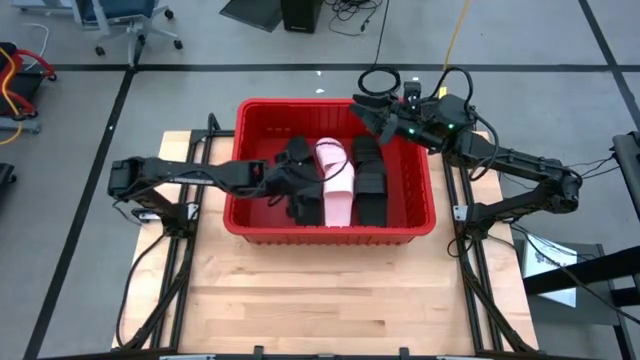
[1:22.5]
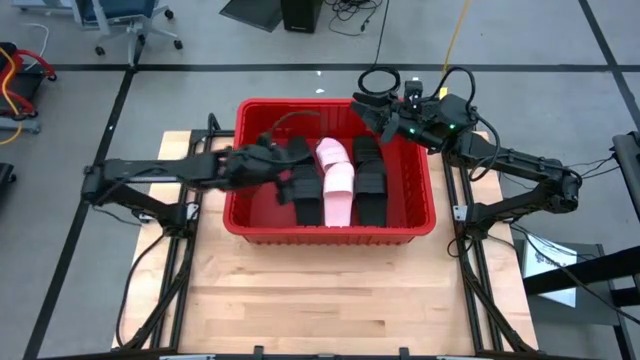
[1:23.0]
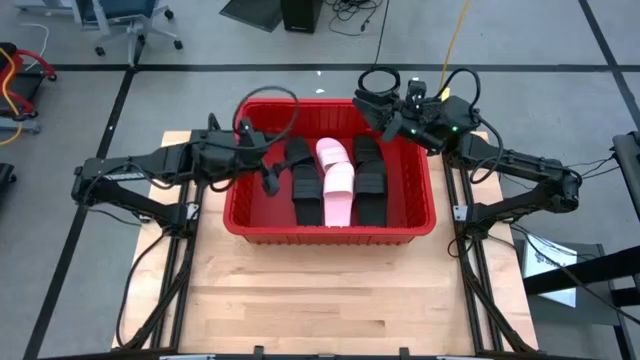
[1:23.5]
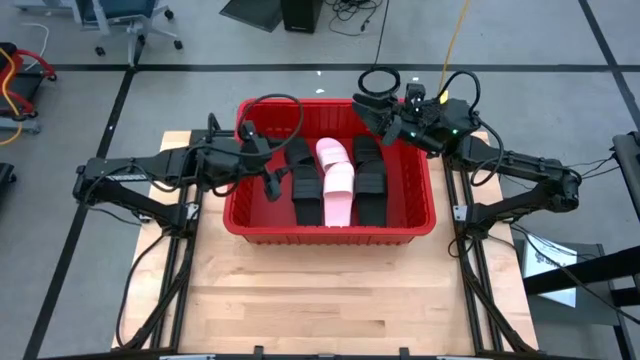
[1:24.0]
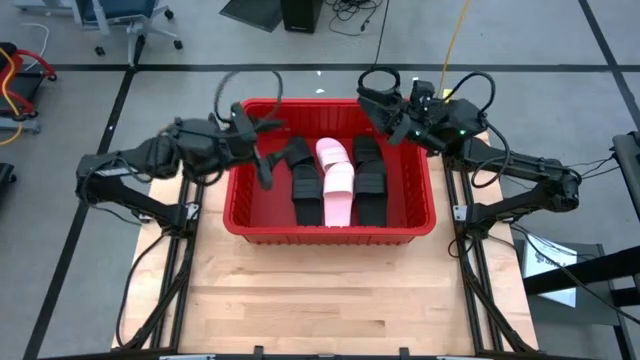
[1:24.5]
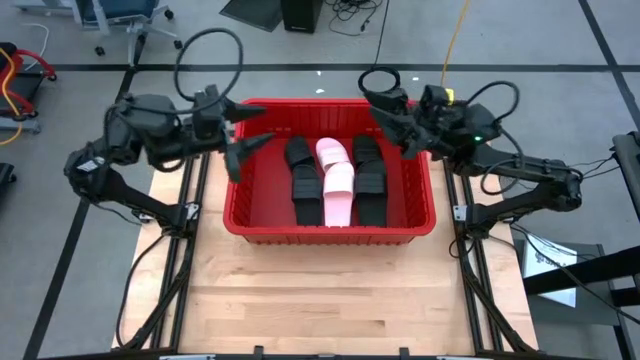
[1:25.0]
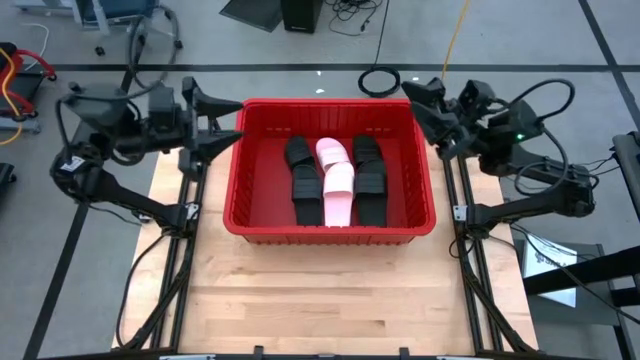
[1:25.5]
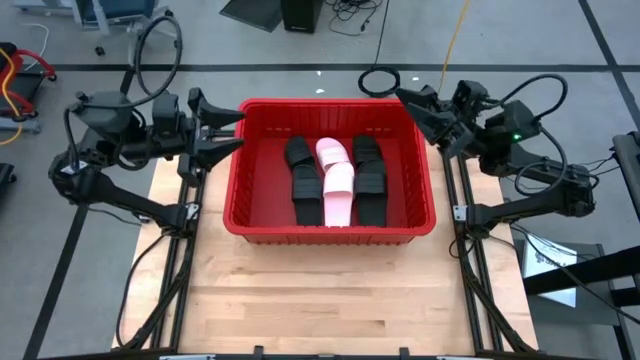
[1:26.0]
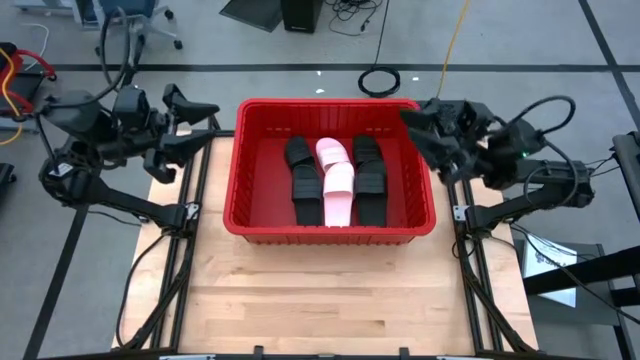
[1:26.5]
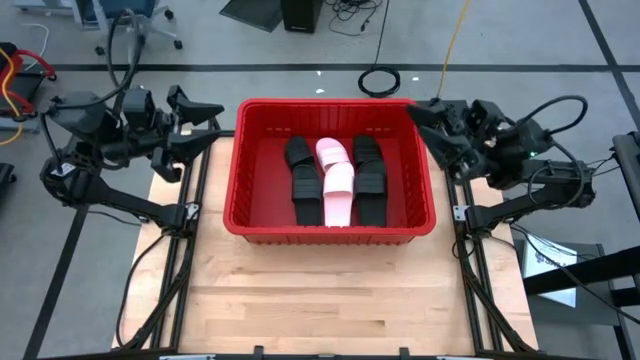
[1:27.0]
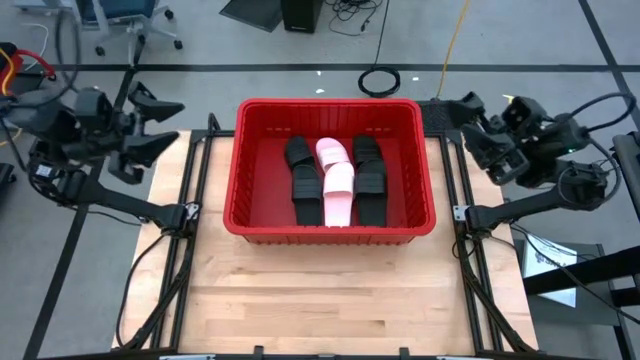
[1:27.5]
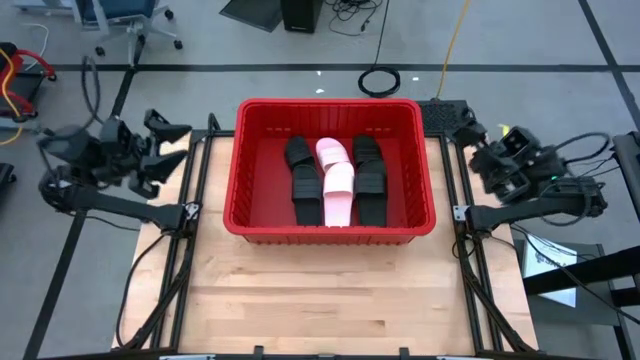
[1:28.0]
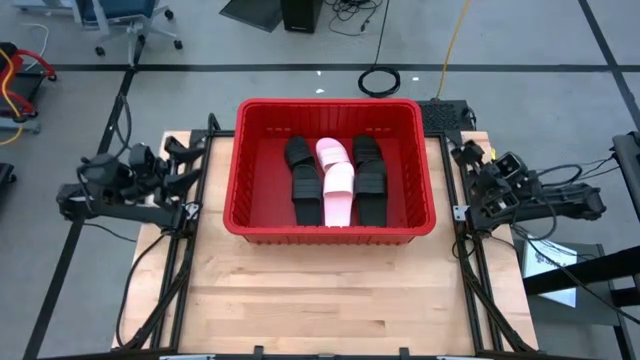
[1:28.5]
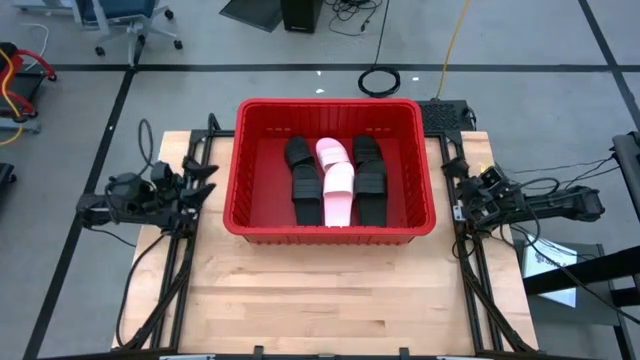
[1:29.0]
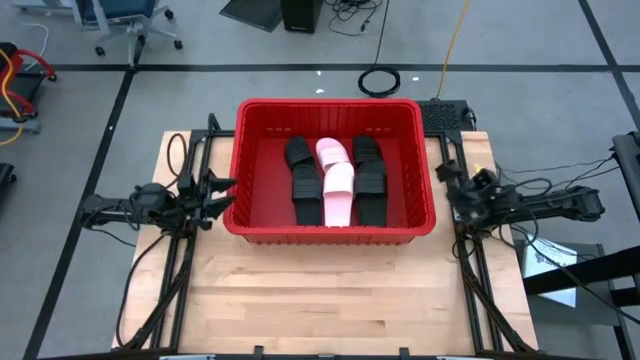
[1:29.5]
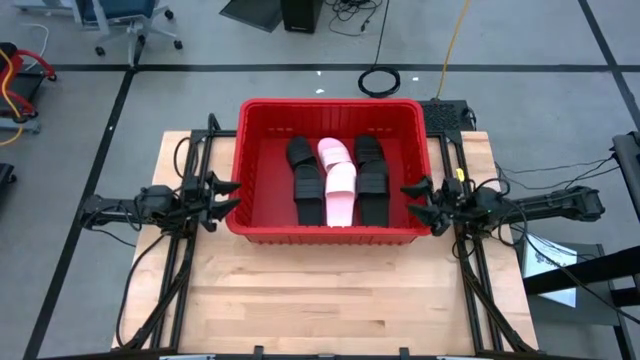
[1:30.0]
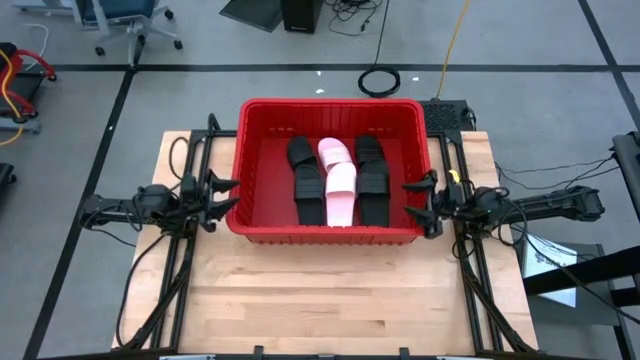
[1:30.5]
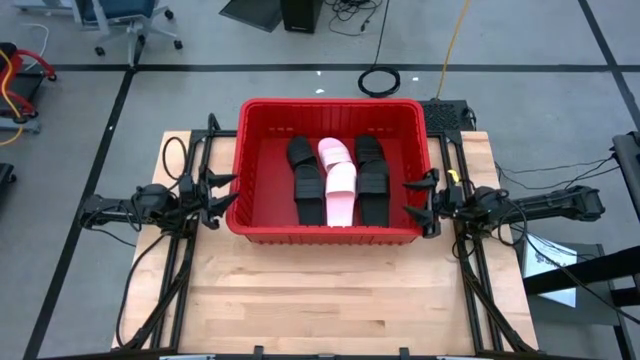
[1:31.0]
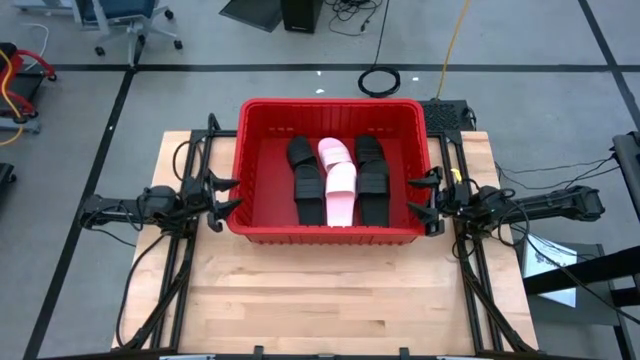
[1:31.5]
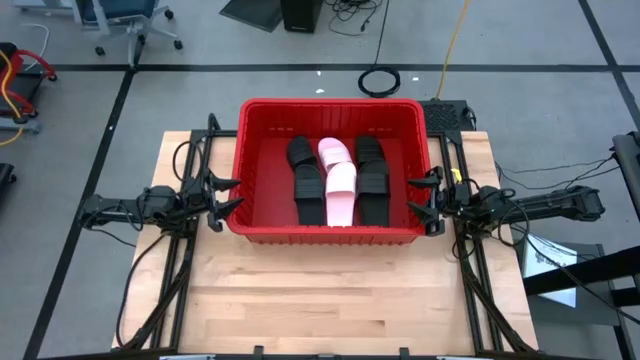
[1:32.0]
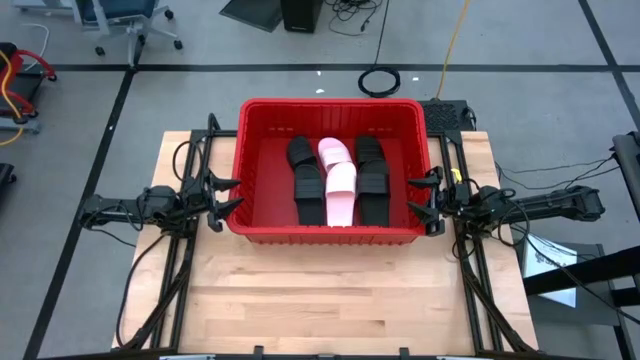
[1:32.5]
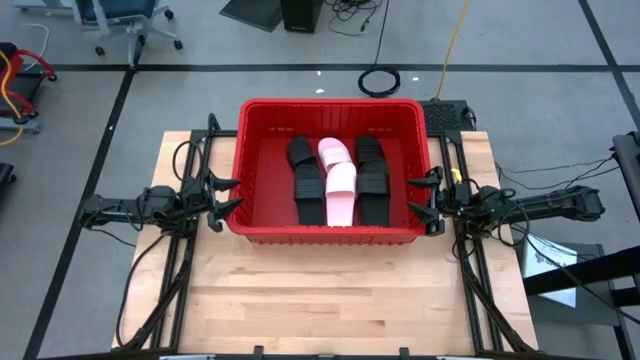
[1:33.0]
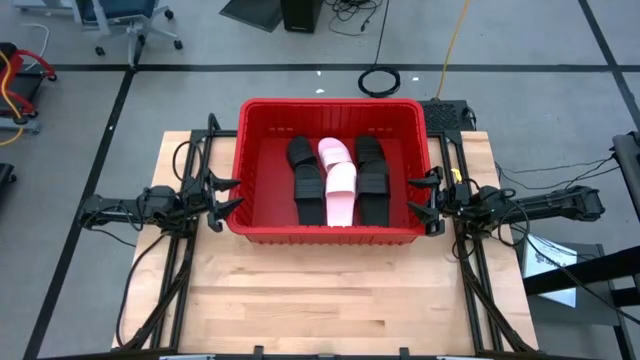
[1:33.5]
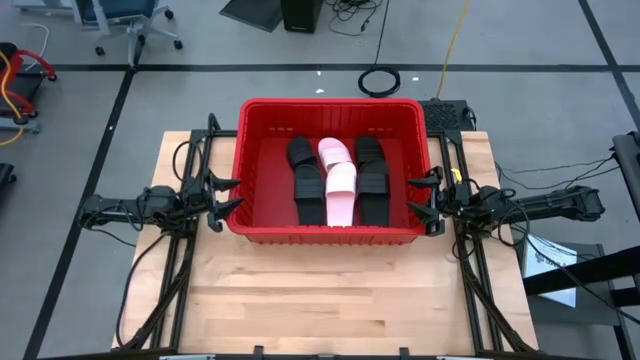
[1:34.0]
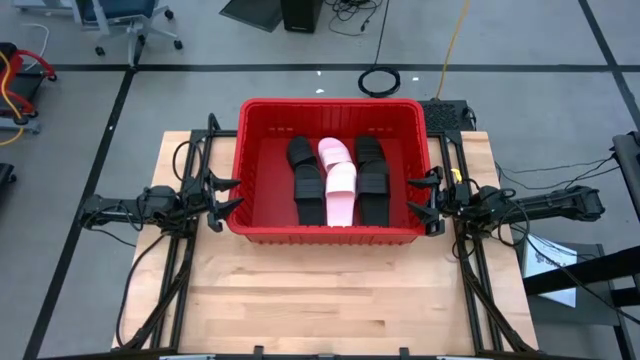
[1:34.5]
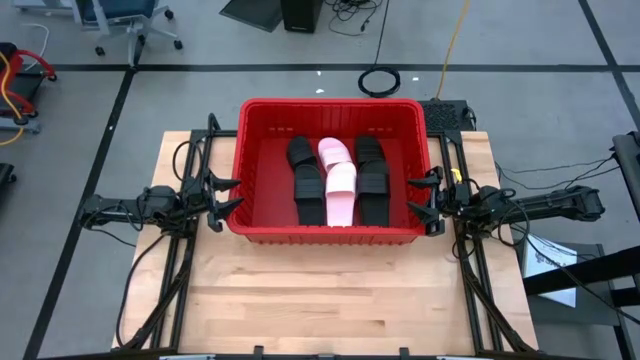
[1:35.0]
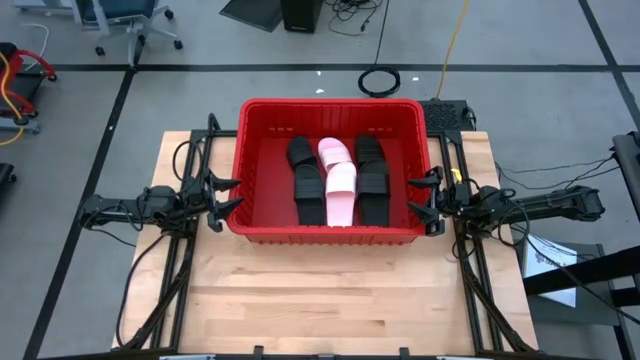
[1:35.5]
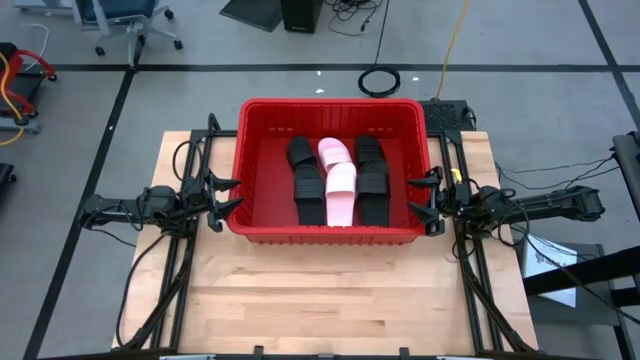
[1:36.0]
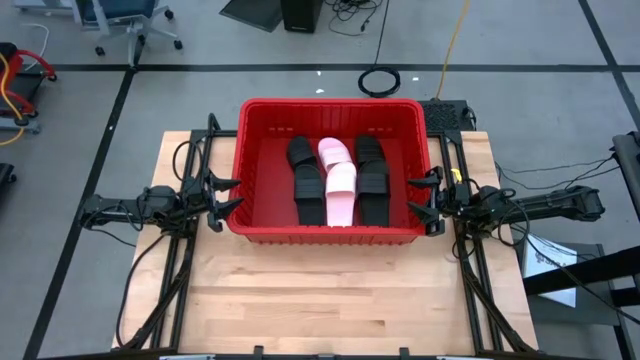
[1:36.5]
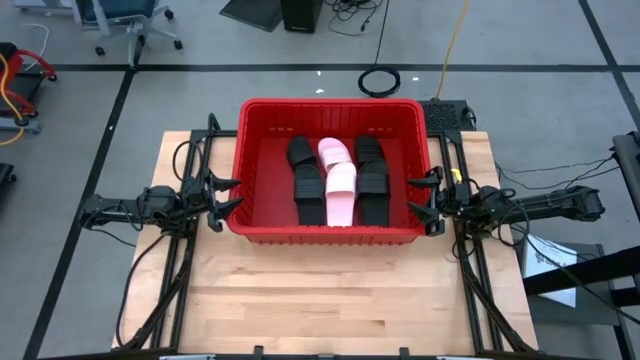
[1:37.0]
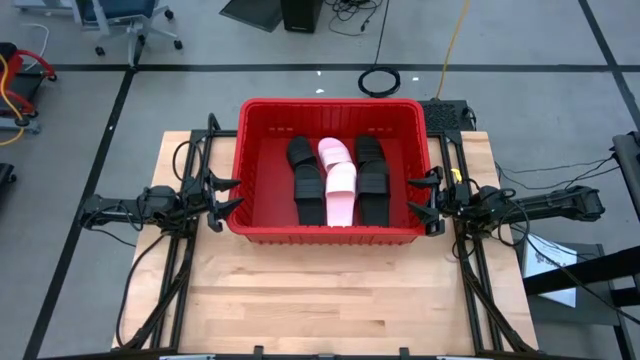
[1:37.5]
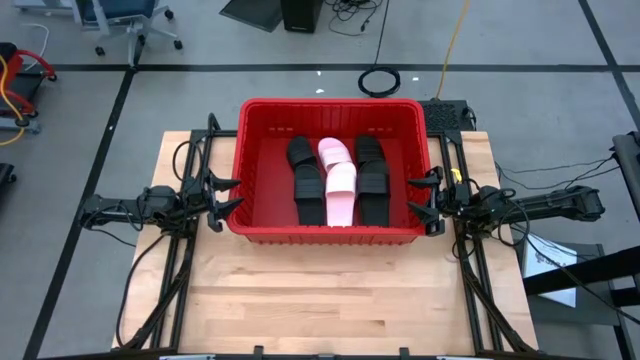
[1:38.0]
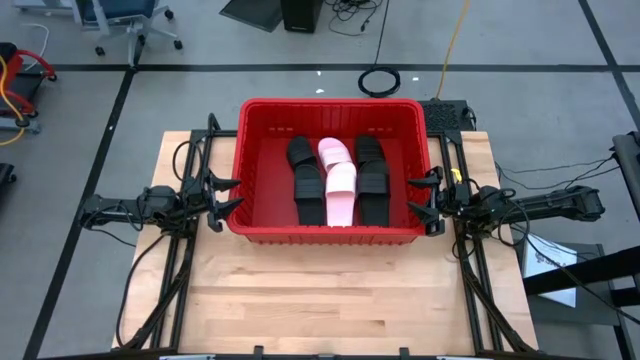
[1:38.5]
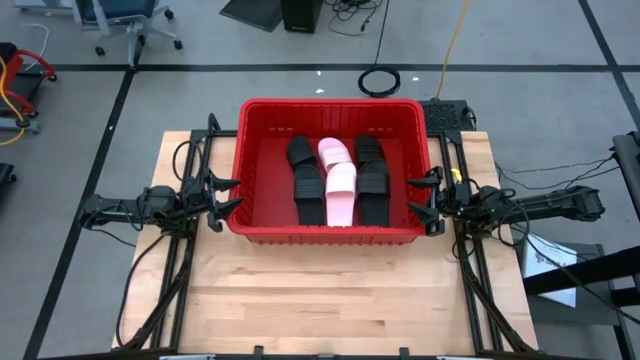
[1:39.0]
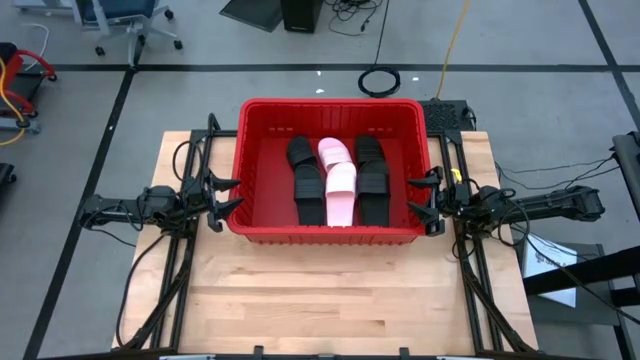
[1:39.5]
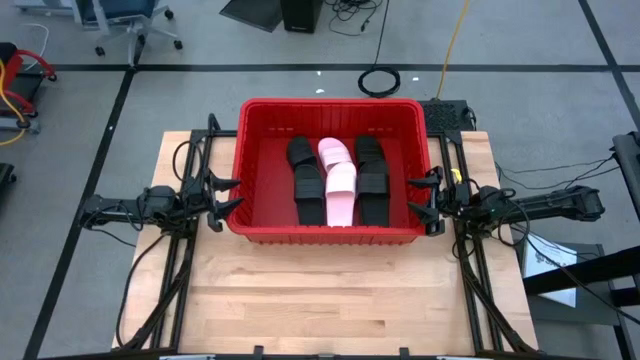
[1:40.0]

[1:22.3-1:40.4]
Task: Pick and place slides into bin
Return to Home Position

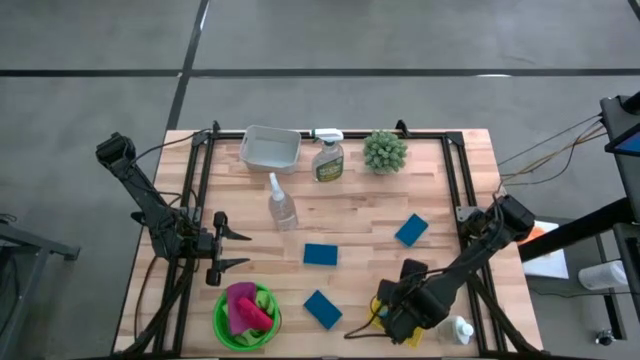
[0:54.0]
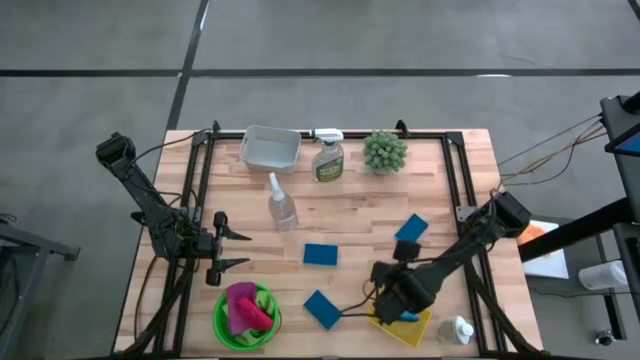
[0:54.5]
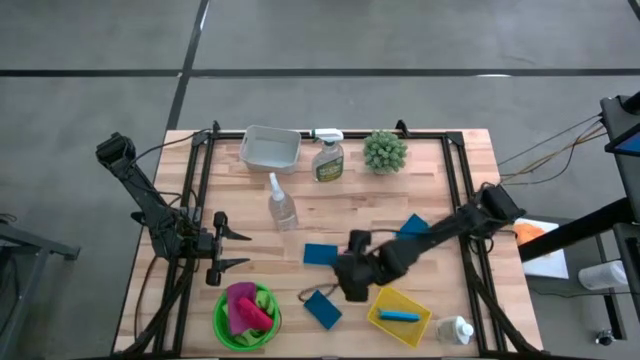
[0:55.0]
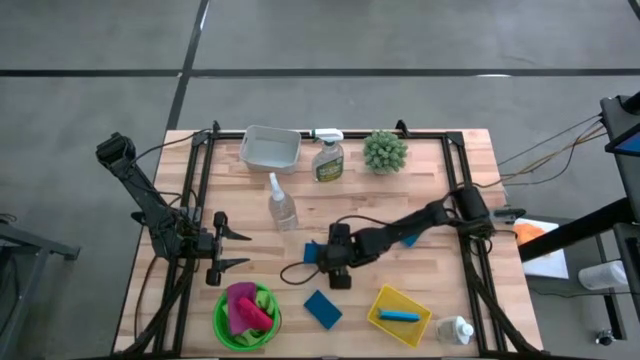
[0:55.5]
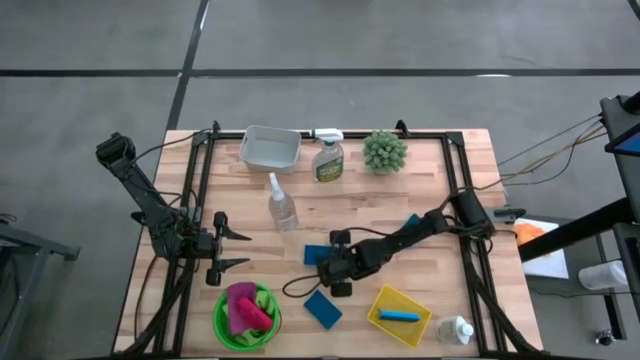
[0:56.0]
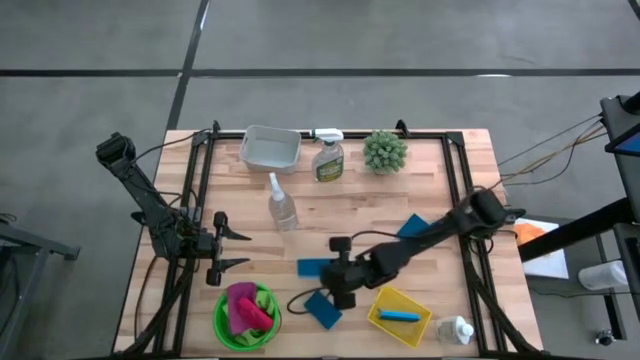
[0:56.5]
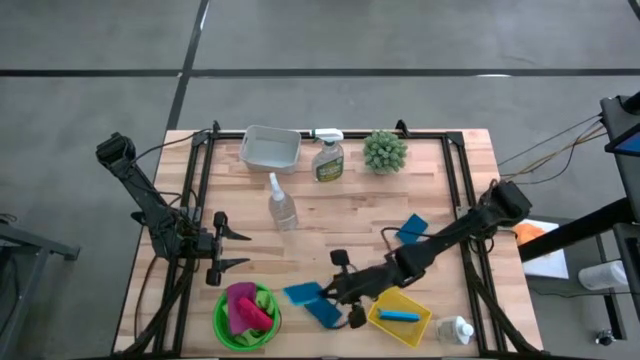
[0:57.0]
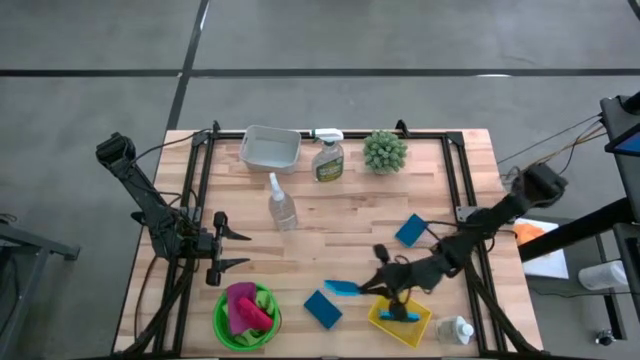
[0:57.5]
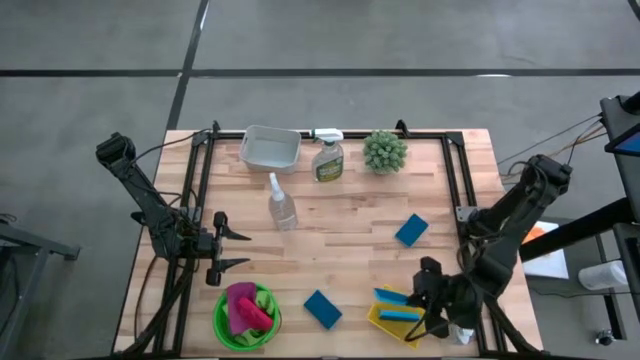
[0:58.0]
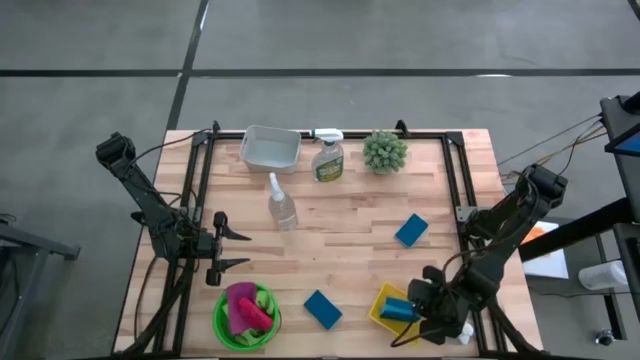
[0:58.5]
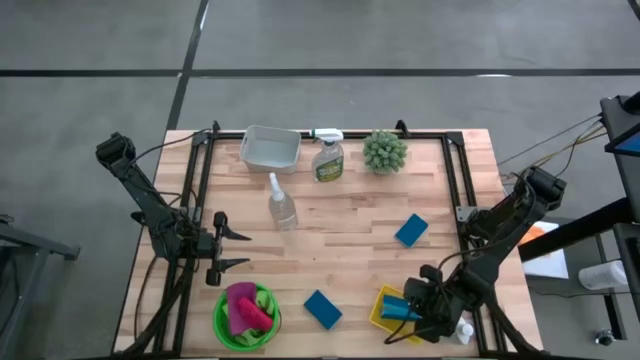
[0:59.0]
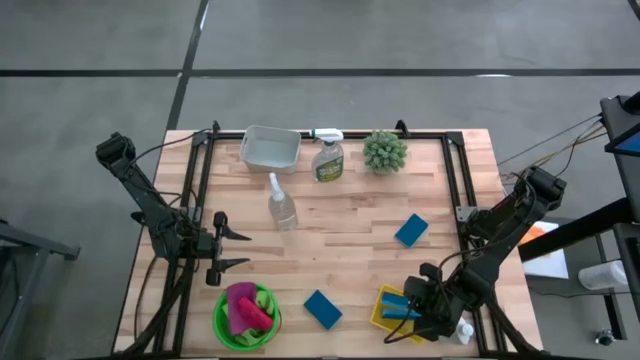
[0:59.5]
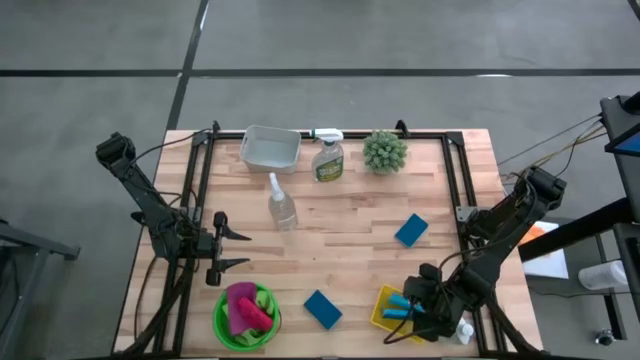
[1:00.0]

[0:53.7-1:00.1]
Task: Pick & Place Kitchen Items
Put the blue sponge into the yellow bin
